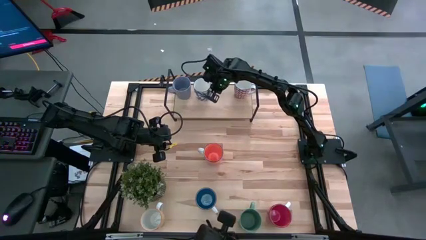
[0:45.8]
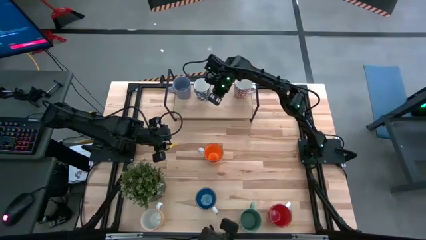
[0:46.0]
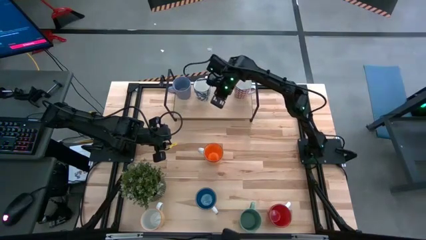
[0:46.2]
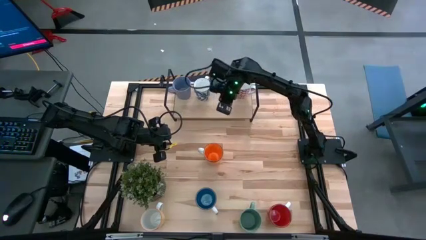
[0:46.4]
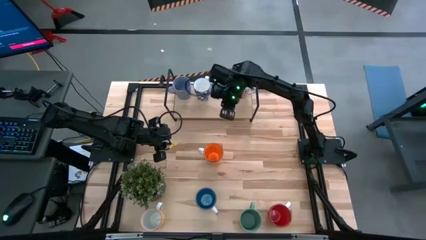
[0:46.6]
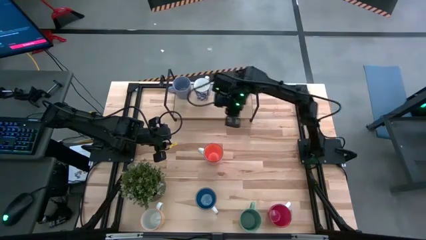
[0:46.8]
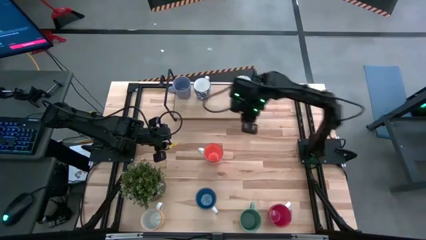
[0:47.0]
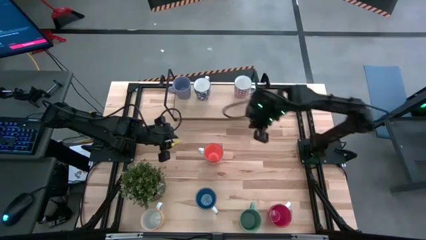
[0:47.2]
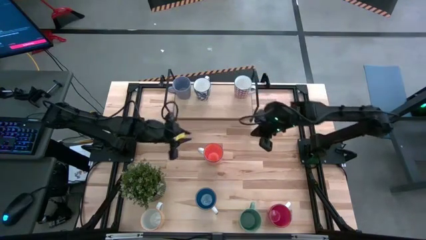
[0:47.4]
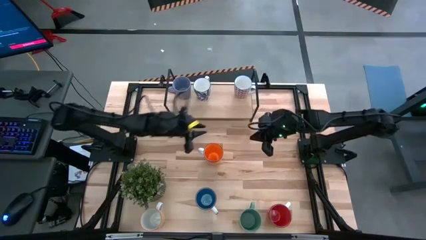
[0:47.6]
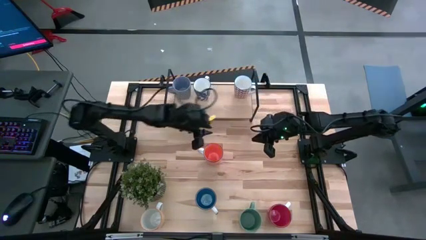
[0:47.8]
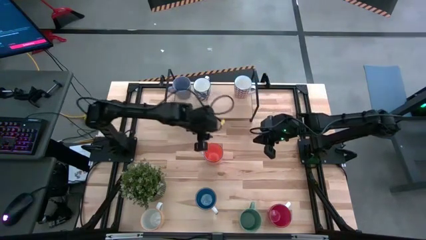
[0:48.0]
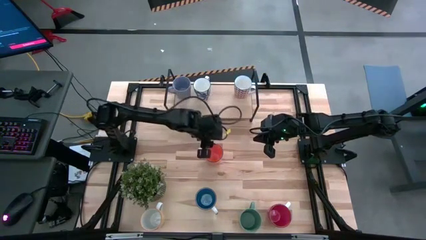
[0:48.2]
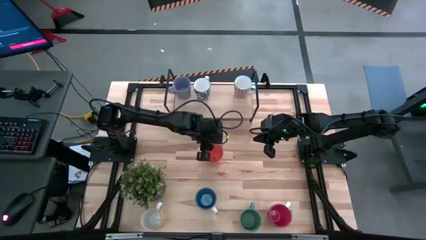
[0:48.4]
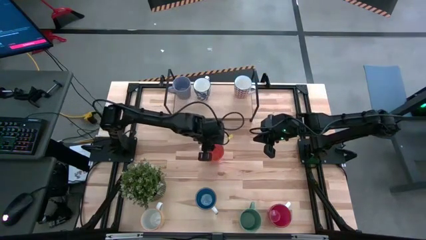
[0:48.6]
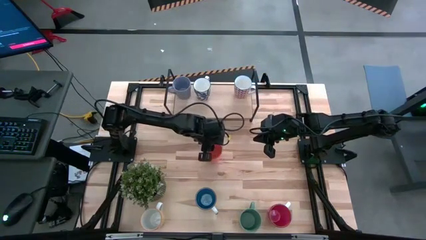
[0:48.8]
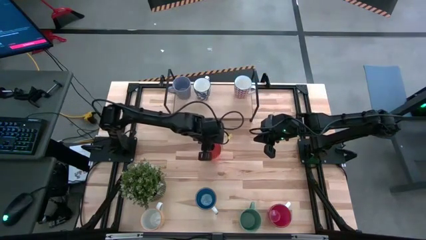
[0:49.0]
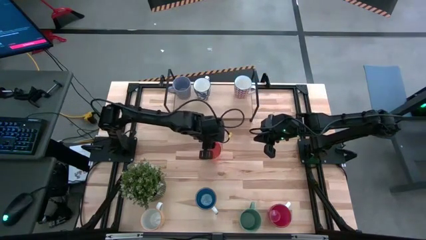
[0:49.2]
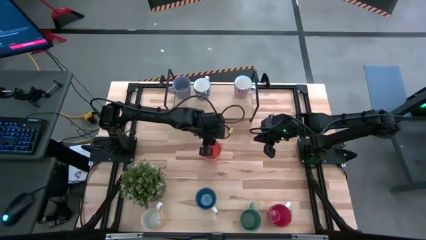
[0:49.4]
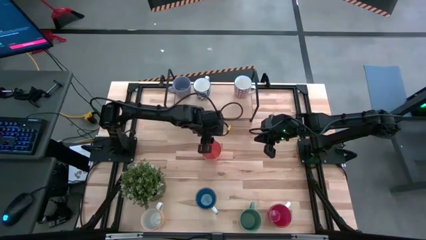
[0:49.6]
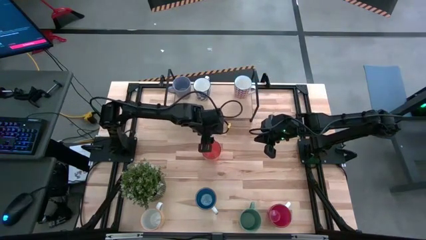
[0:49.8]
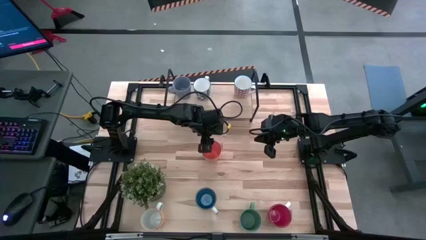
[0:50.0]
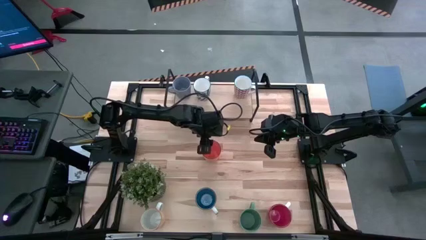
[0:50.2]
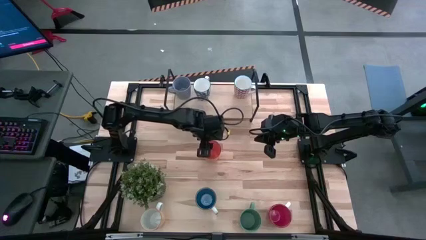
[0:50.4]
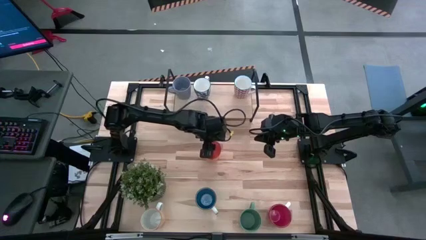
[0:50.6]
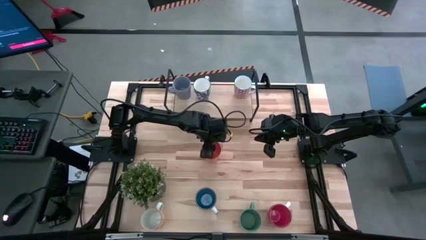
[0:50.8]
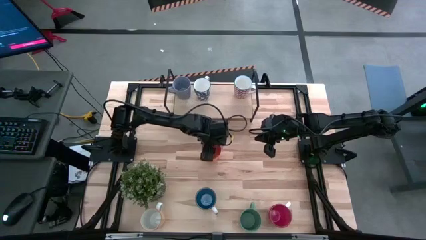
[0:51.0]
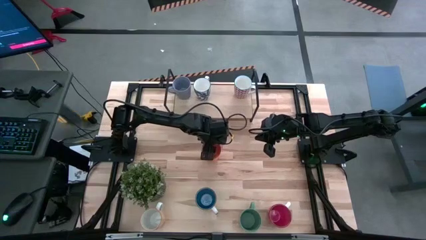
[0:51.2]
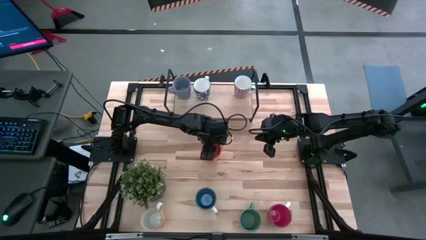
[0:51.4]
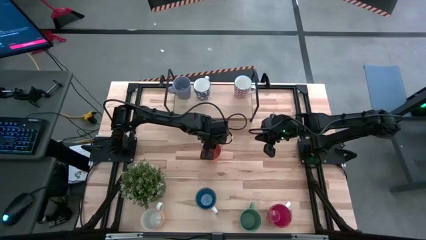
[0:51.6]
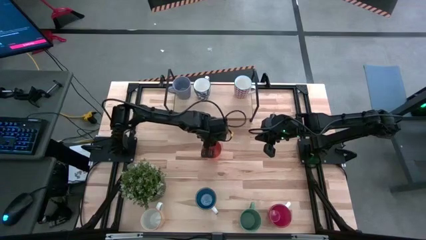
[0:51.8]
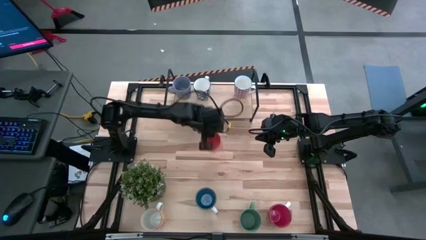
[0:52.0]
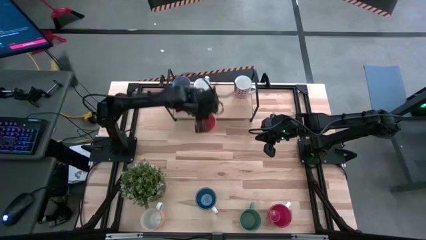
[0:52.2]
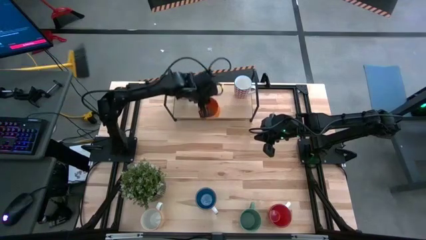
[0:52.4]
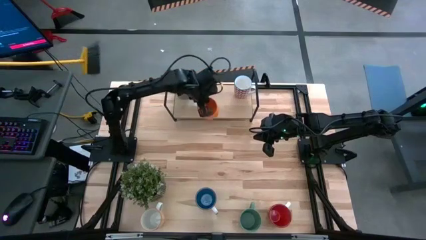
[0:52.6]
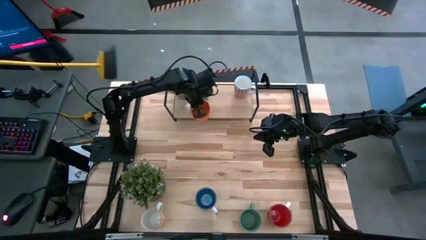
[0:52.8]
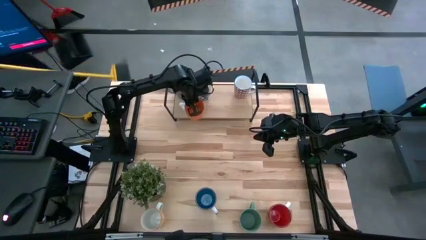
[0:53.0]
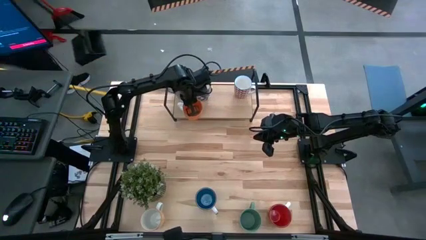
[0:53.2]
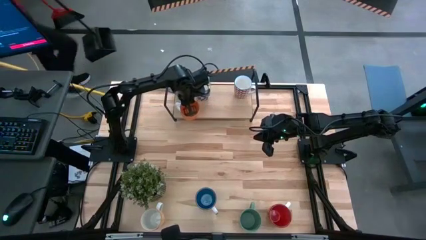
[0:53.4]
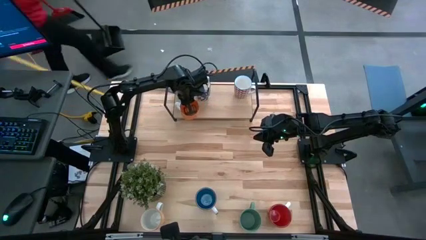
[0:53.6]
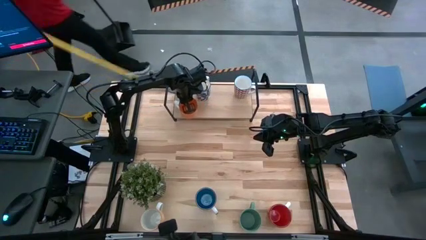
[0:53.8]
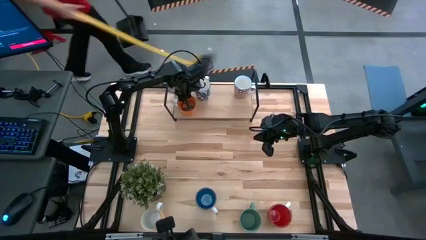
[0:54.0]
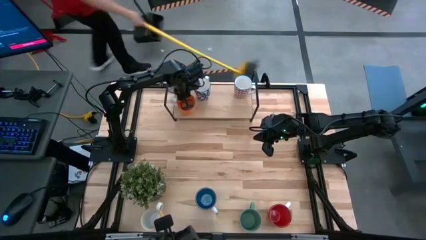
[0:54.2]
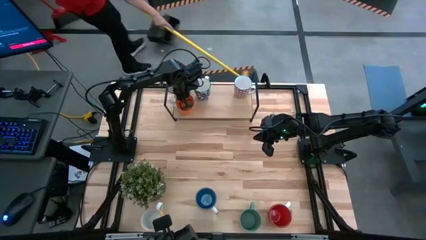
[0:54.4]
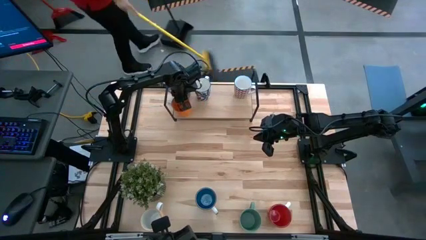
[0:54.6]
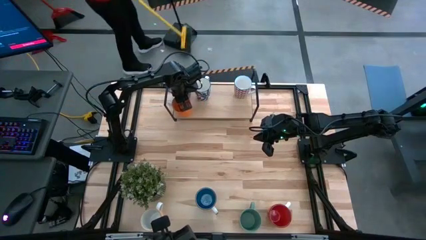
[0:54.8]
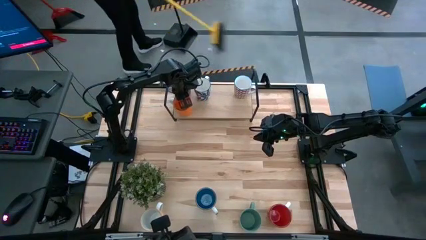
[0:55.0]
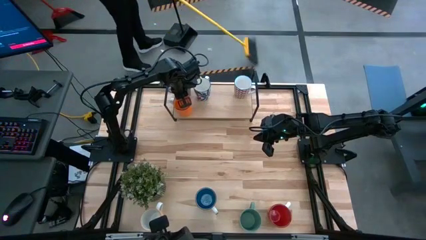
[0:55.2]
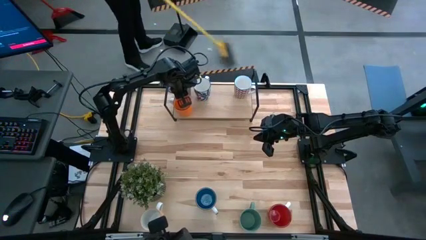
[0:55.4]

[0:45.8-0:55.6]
Task: Place coffee mugs
Put the orange mug on the shelf

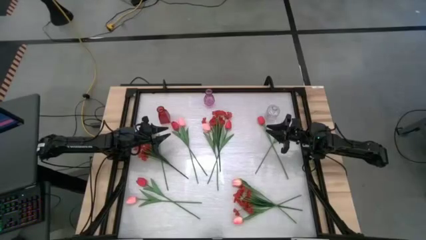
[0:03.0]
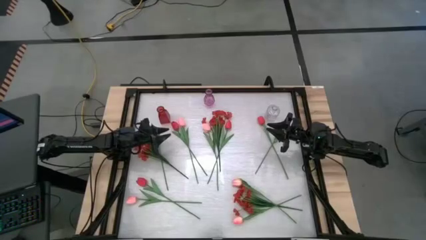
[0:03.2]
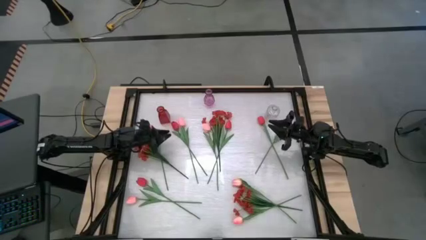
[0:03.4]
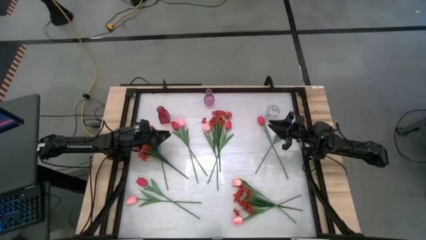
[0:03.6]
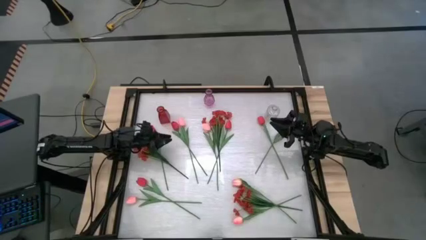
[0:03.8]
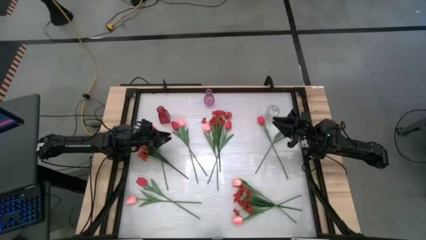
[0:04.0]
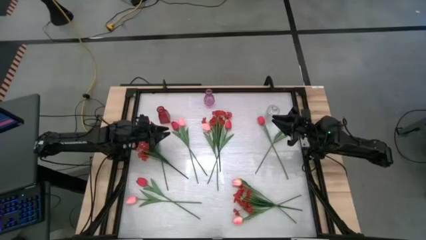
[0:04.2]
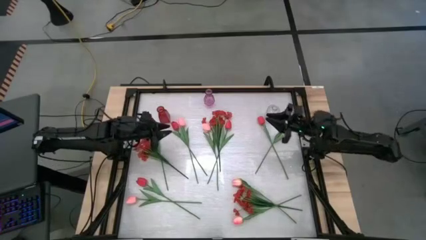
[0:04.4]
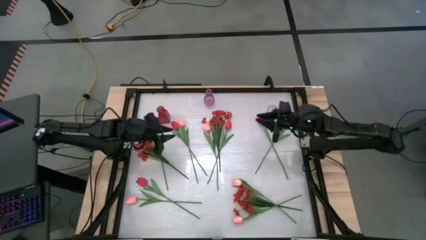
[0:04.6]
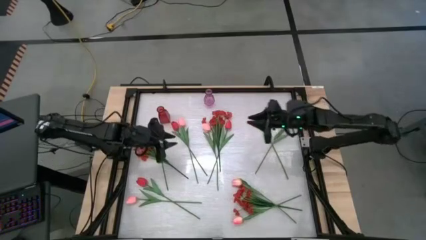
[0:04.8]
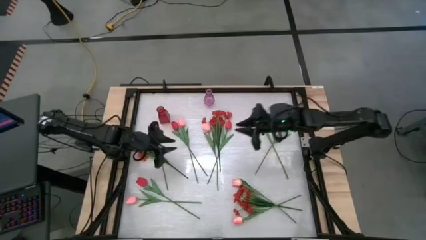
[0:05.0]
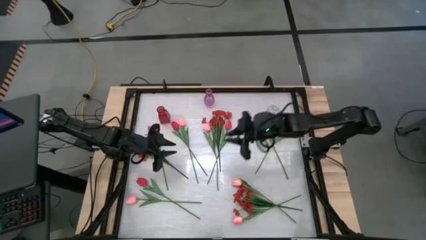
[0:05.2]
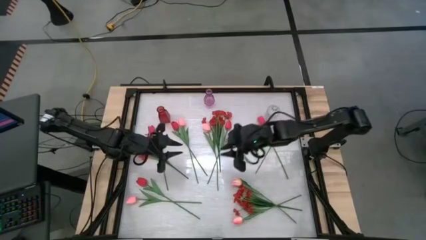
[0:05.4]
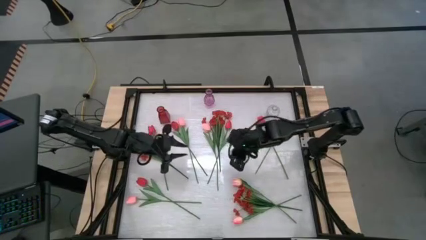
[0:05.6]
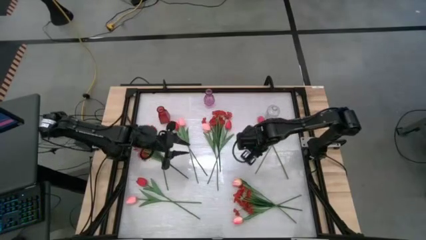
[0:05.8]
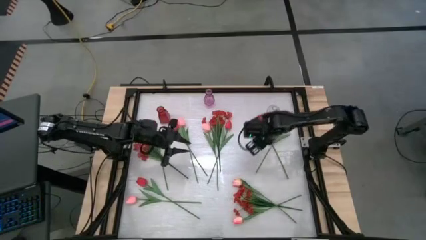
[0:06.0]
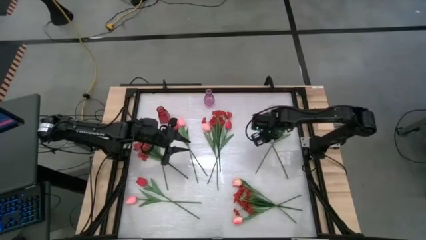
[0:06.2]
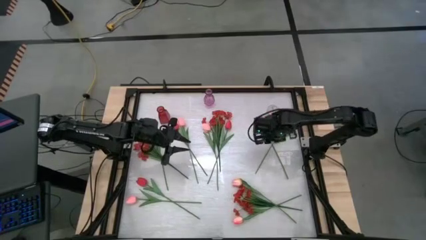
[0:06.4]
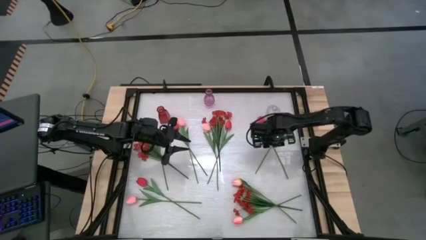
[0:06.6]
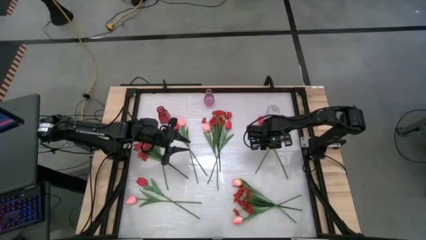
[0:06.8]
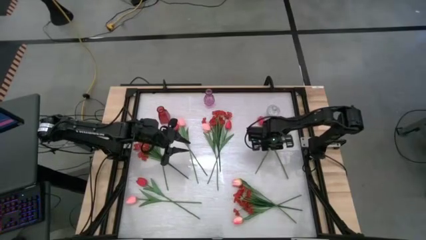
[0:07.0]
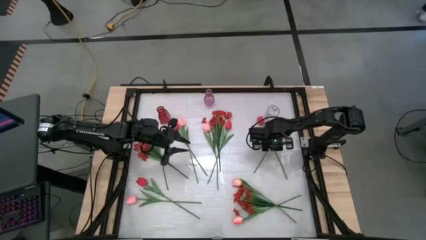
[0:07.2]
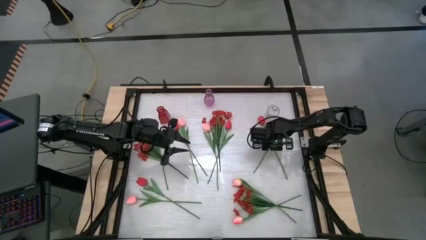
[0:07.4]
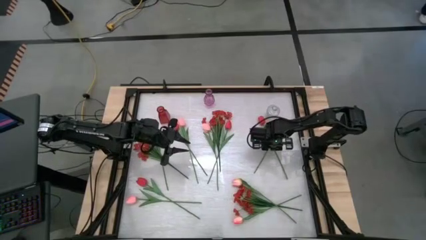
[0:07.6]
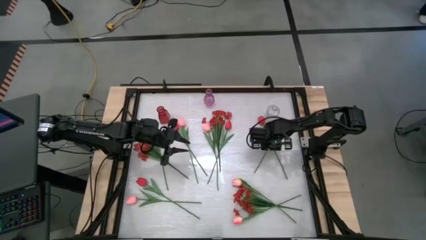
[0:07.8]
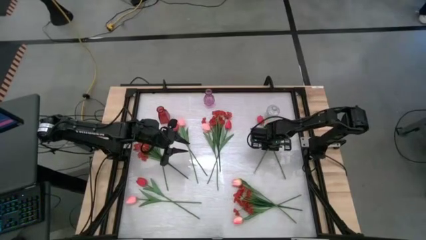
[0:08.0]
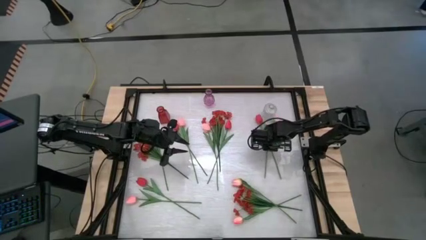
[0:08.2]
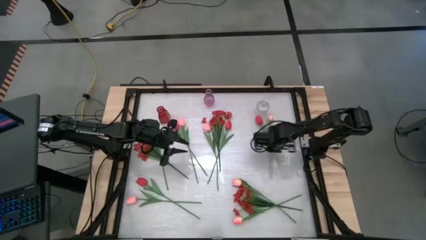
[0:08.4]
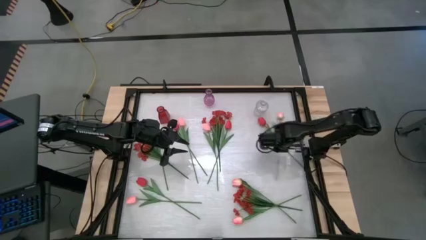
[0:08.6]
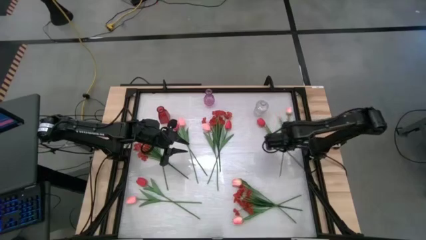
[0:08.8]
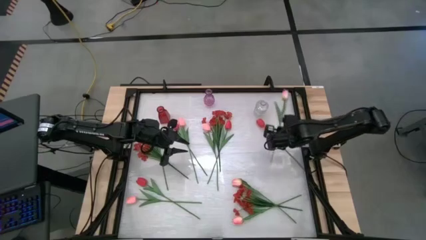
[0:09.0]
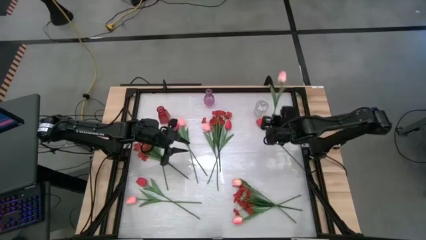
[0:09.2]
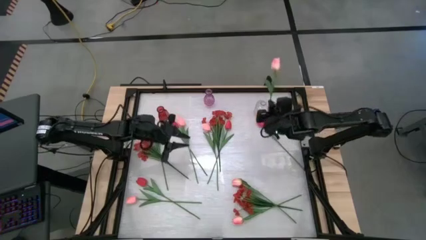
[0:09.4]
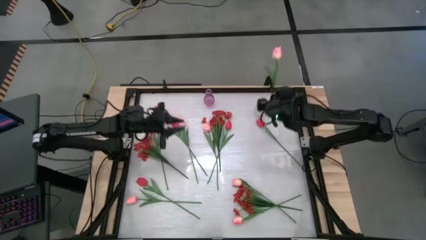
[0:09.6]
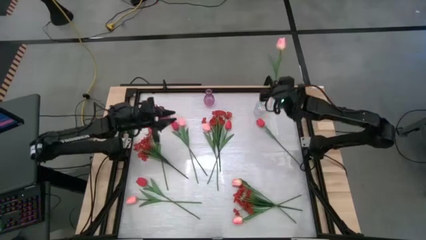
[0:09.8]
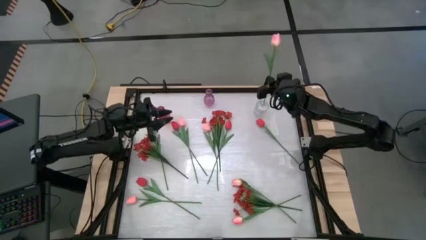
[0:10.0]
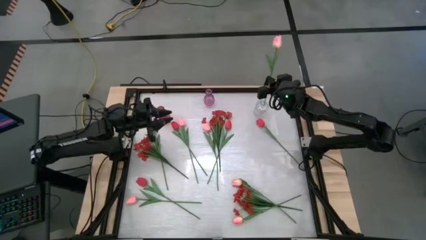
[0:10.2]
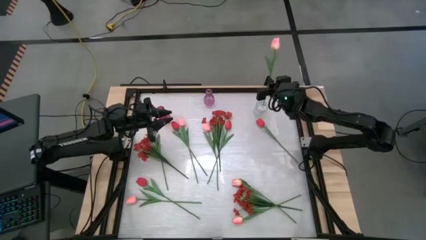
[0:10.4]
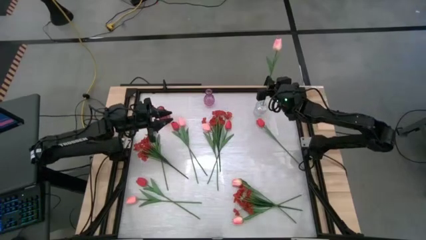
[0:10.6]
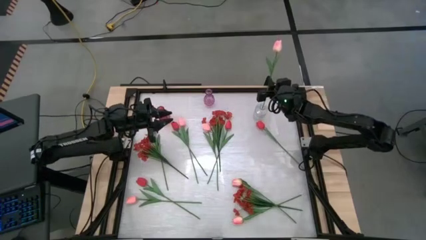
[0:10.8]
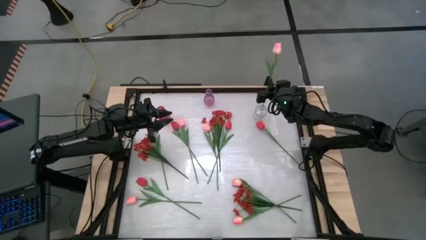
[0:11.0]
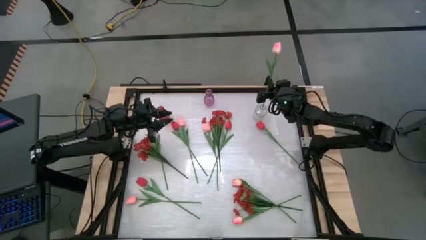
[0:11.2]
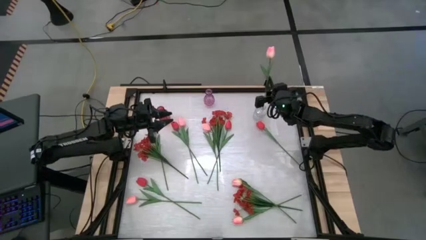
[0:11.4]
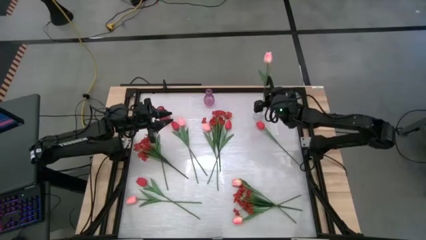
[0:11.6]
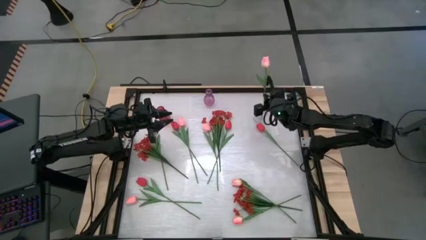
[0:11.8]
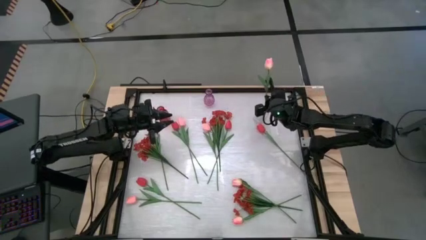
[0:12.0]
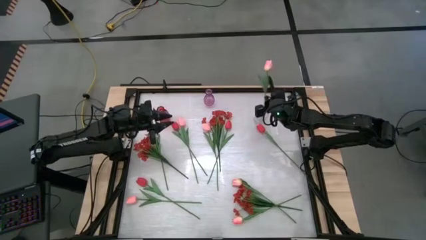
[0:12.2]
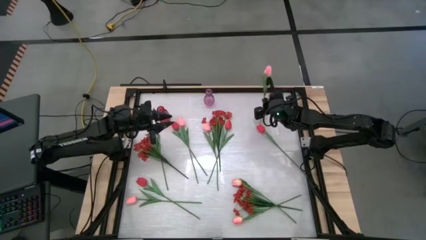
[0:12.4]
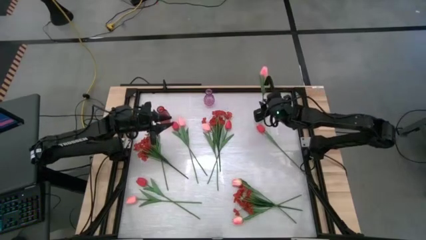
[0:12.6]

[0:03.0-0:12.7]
Task: Sort flowers into vase by color
Put the top right pink tulip into the transparent vase
